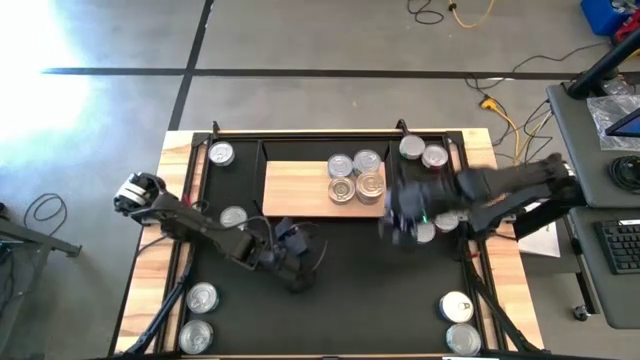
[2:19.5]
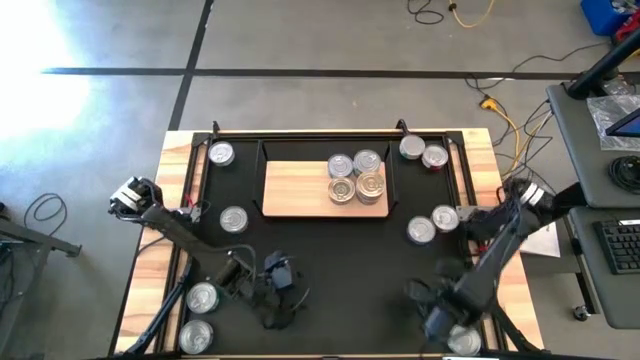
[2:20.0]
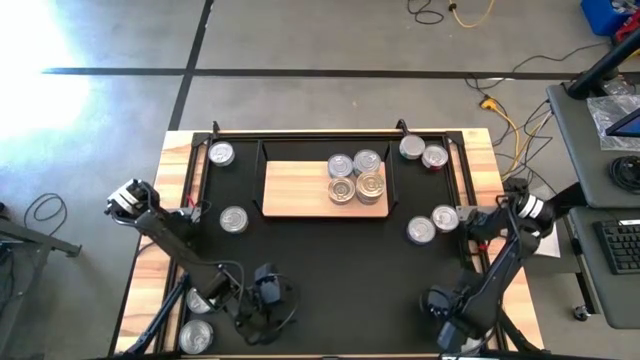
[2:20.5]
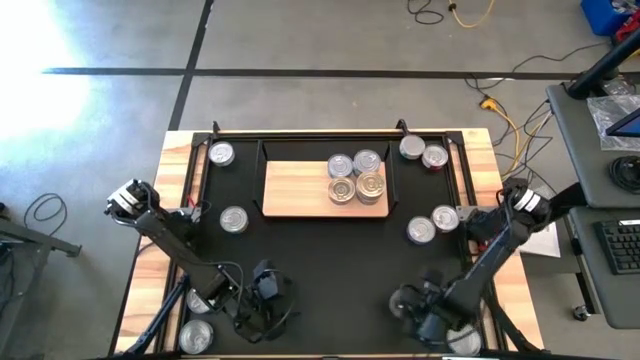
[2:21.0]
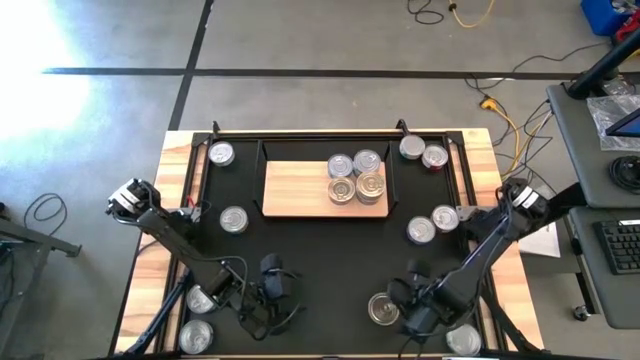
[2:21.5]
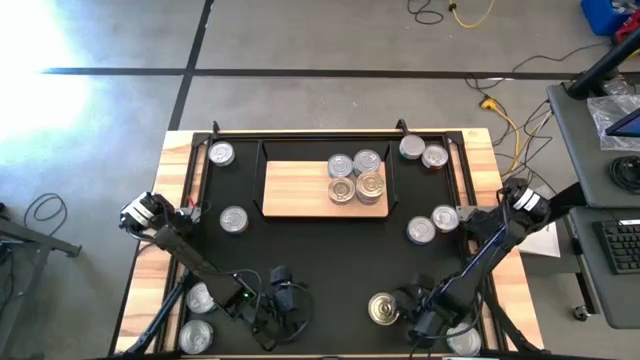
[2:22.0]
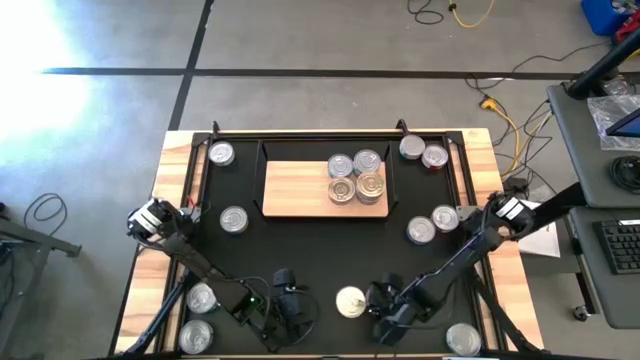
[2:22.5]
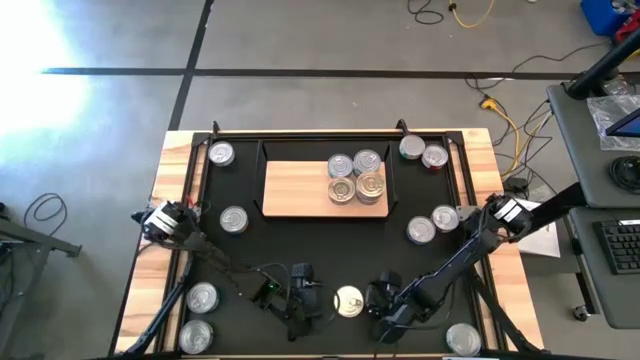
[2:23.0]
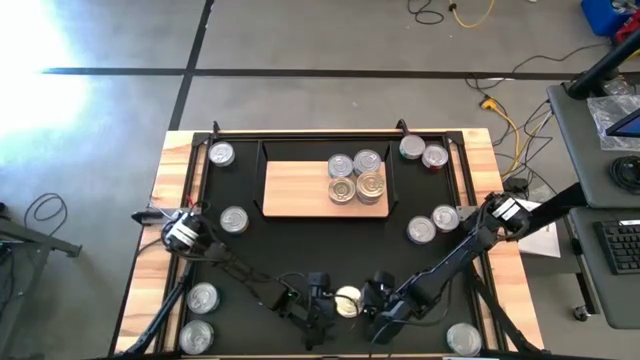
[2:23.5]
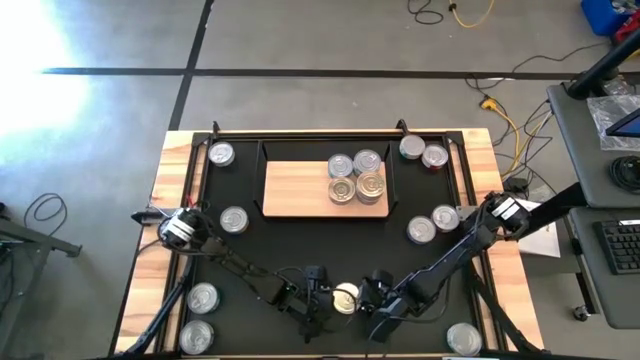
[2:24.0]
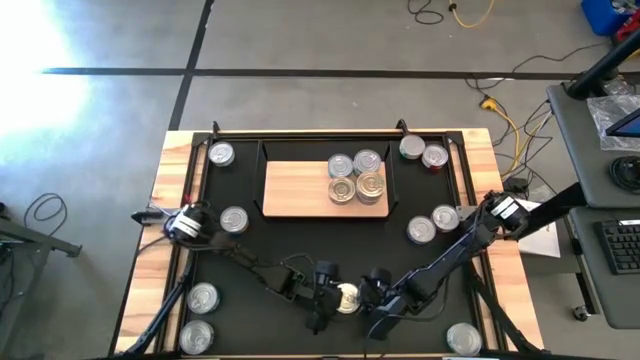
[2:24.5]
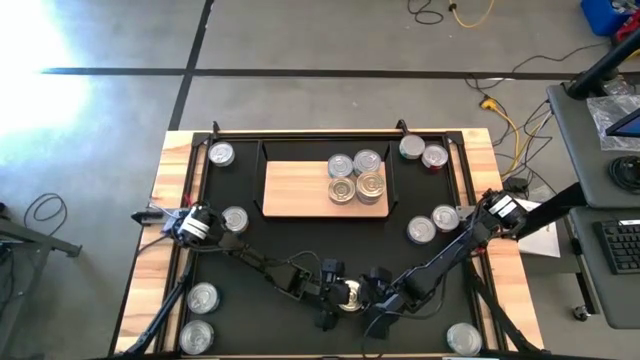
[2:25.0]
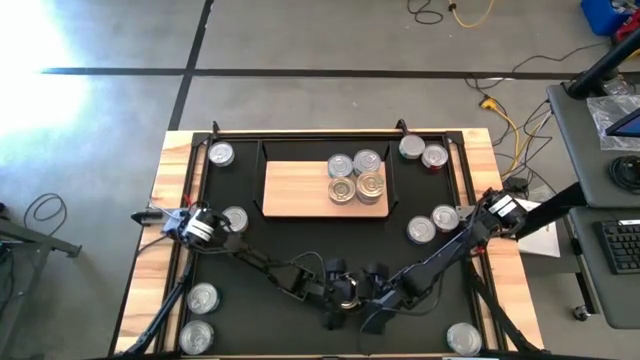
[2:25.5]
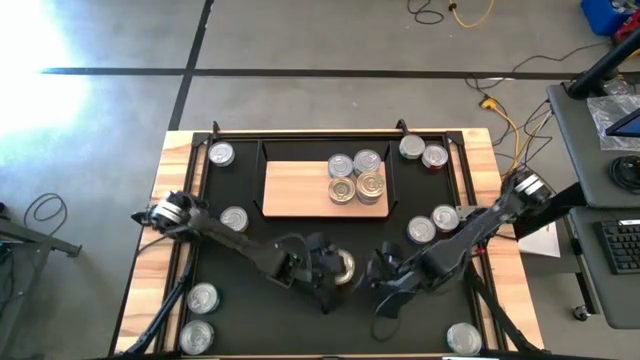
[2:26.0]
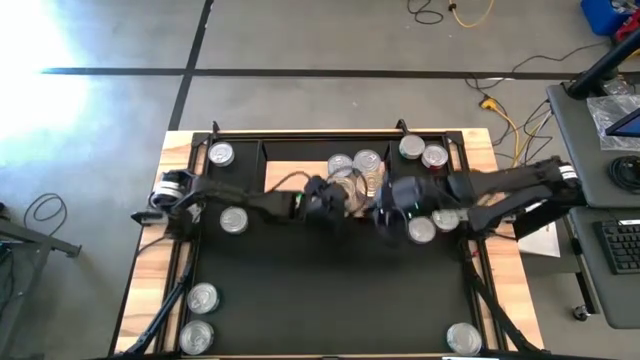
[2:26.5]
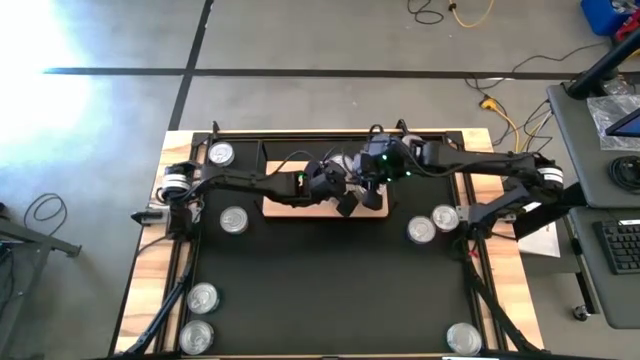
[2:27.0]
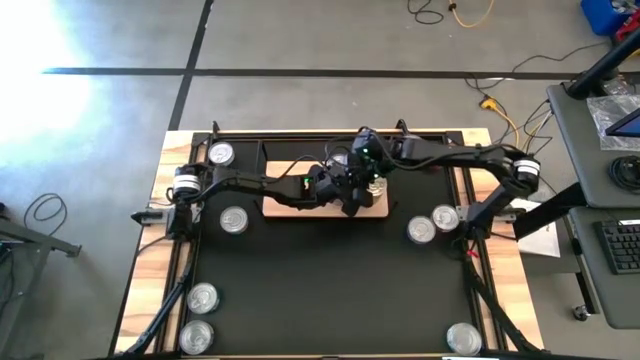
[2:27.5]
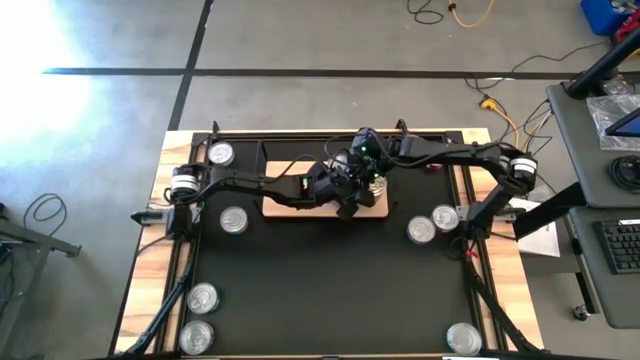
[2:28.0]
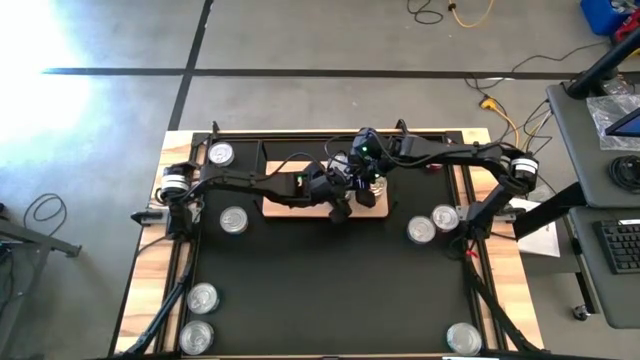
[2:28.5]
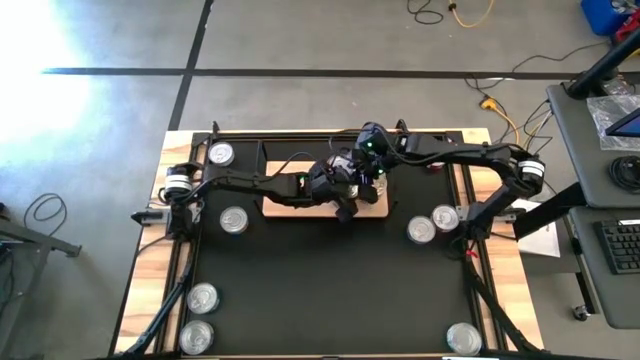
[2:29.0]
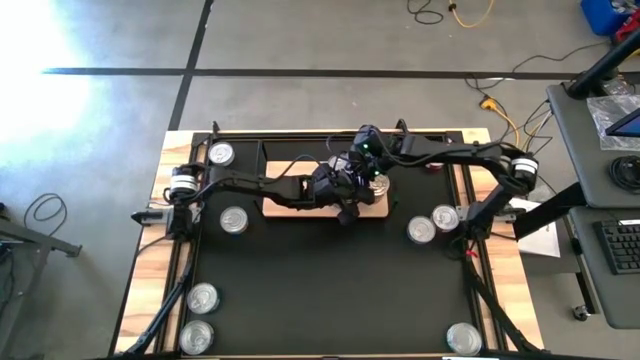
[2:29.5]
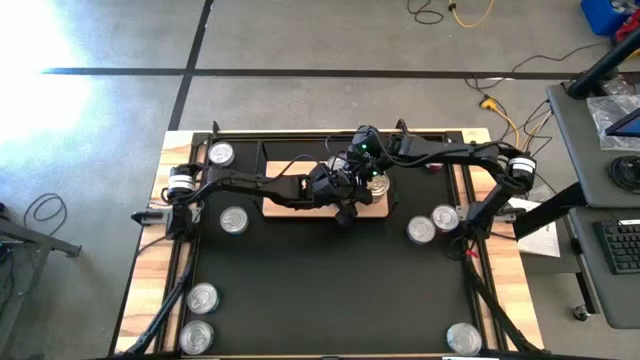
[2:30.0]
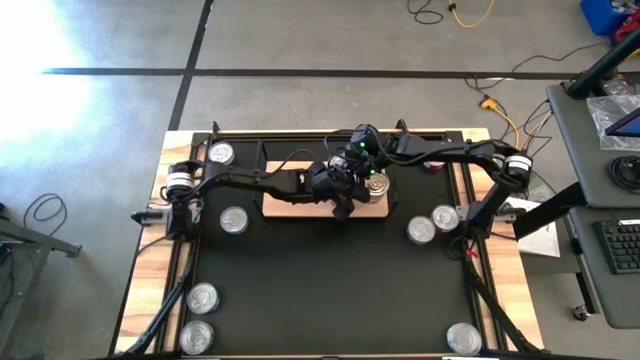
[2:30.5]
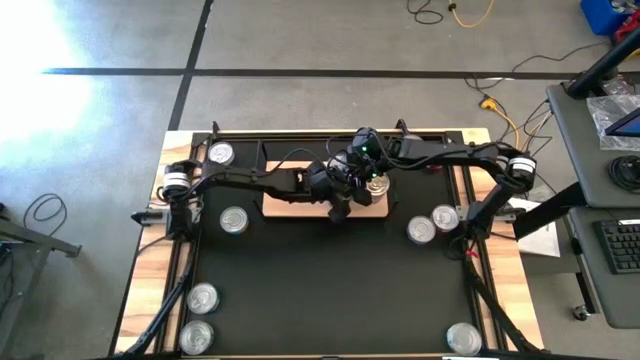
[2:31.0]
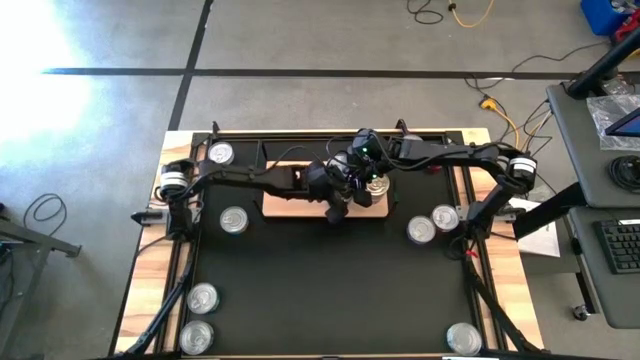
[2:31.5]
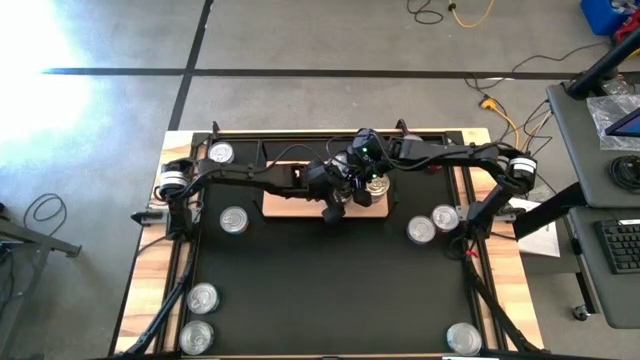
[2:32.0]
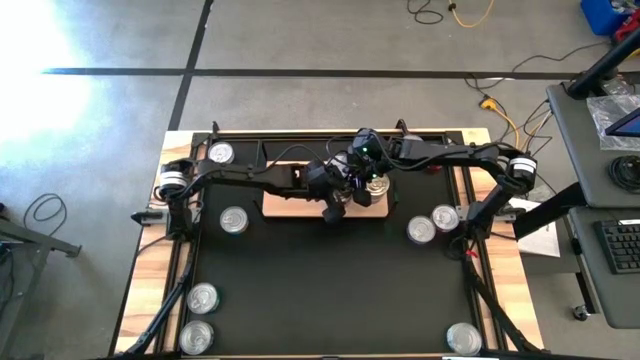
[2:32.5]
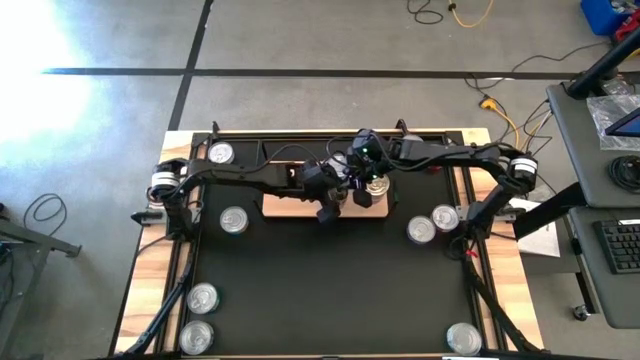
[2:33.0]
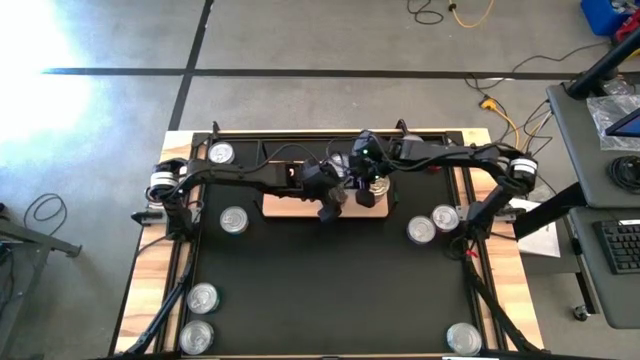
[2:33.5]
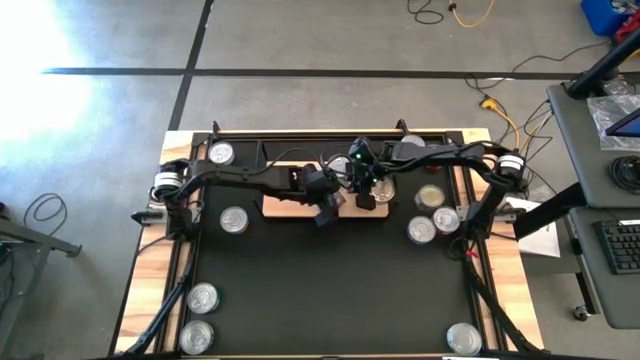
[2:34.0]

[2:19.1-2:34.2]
Task: Stack canned seafood by type on shelf
Stack the bottom right blue tuna can on the blue tuna can

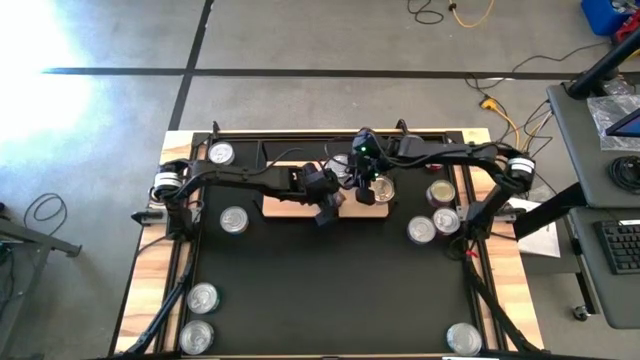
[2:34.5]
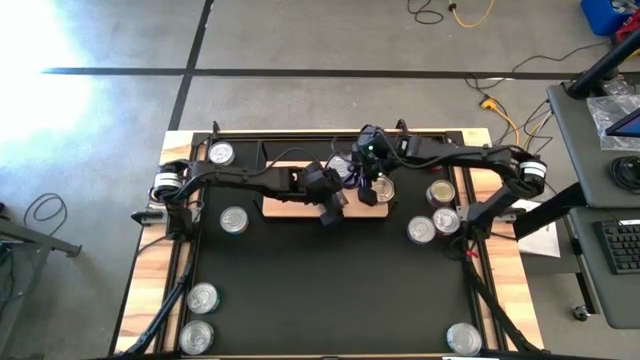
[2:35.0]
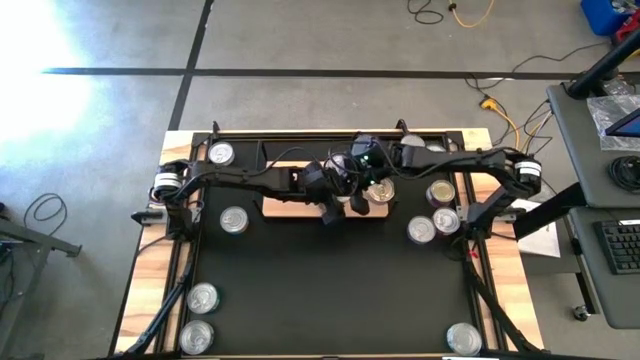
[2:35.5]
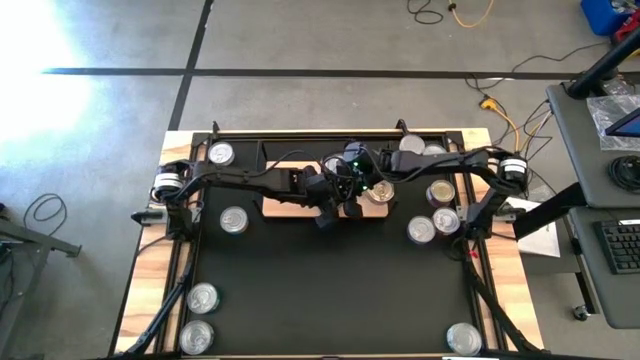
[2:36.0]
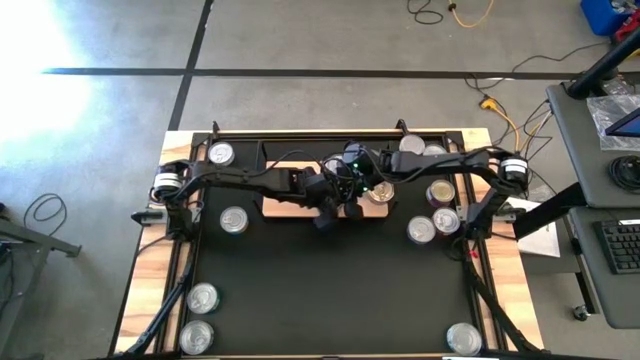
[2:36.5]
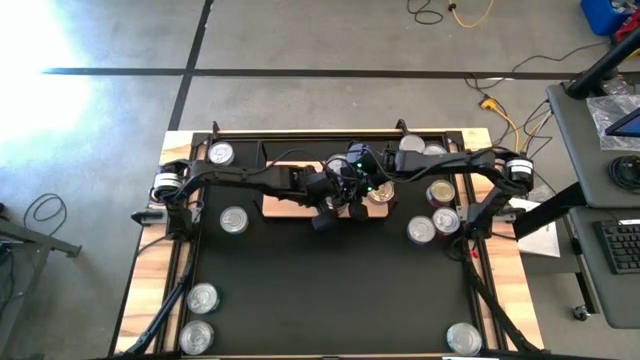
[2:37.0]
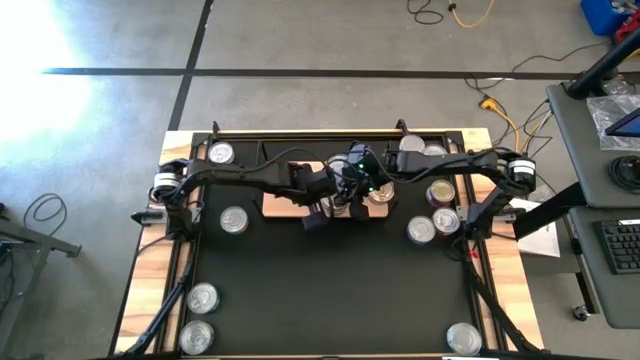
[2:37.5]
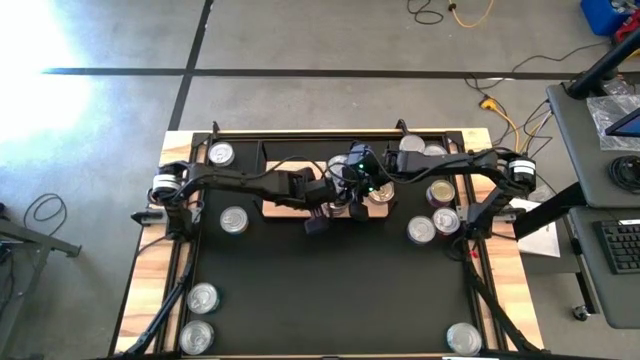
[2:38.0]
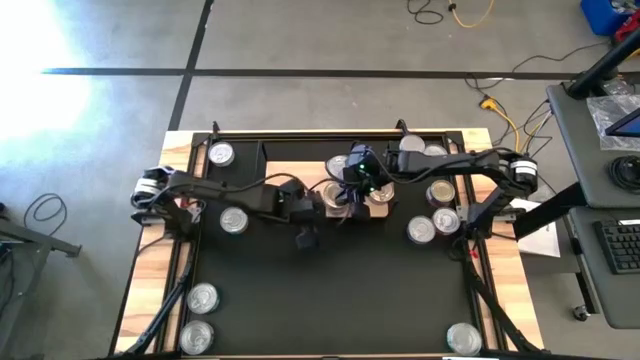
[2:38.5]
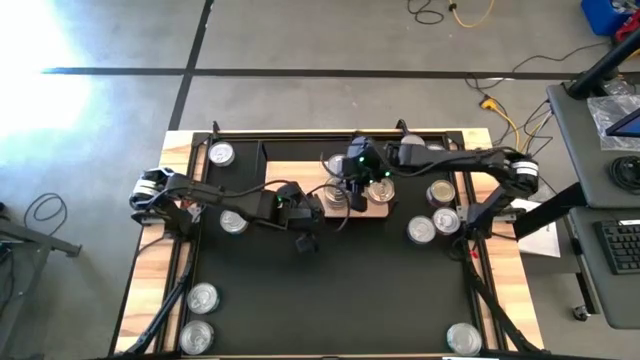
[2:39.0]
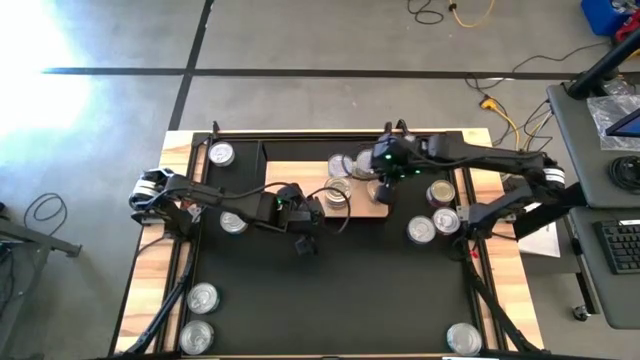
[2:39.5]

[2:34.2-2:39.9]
Stack the bottom right blue tuna can on the blue tuna can

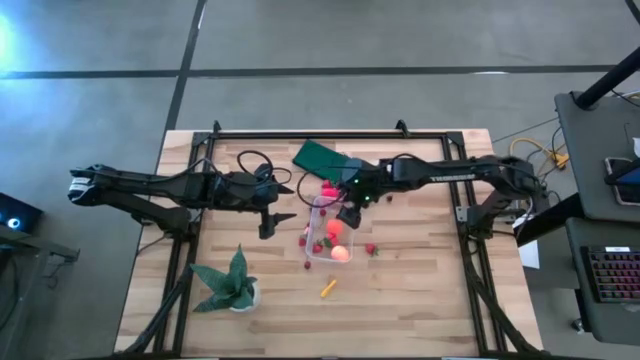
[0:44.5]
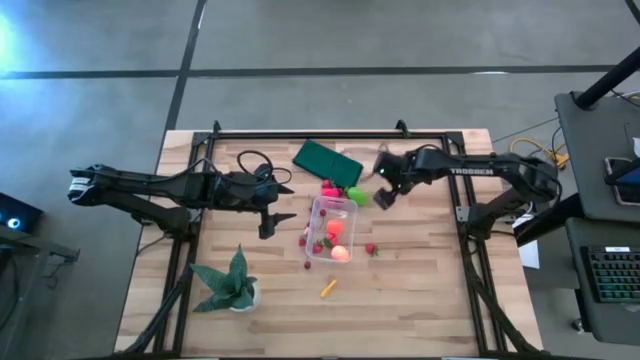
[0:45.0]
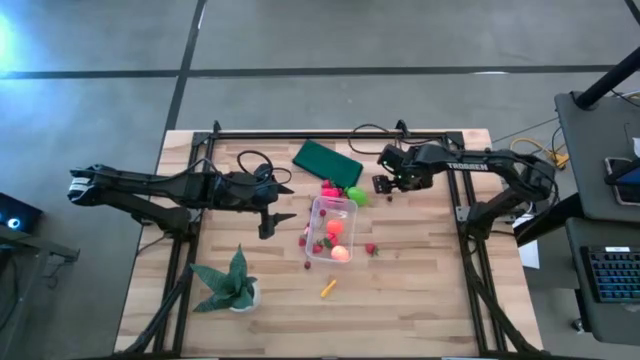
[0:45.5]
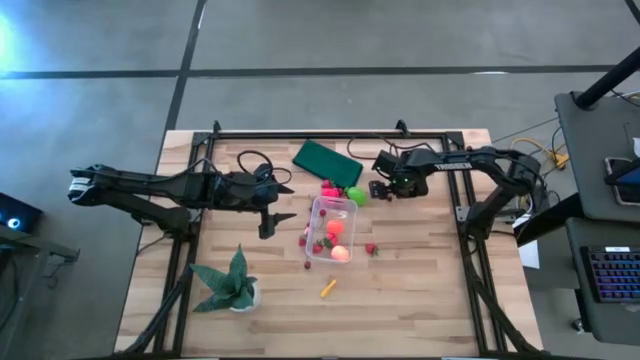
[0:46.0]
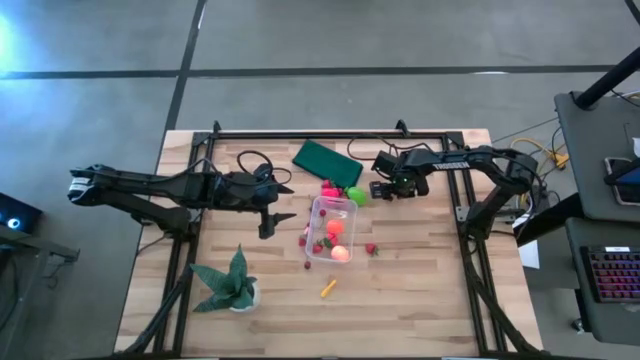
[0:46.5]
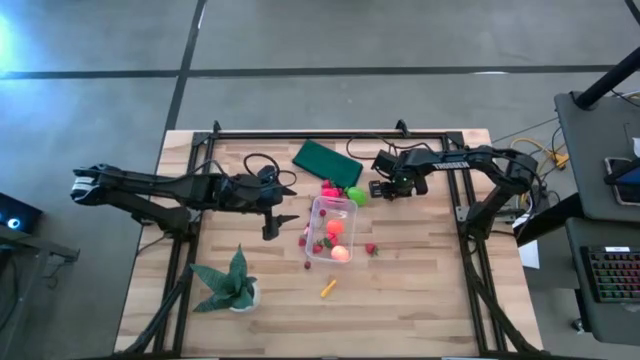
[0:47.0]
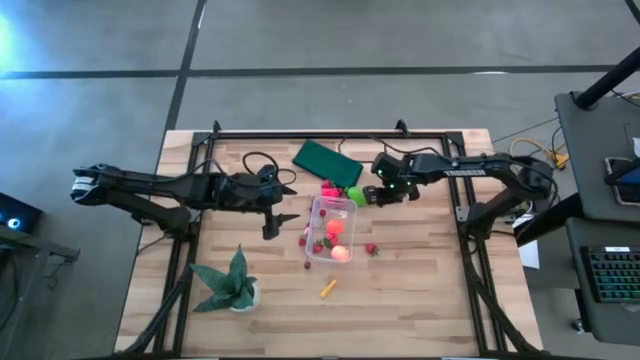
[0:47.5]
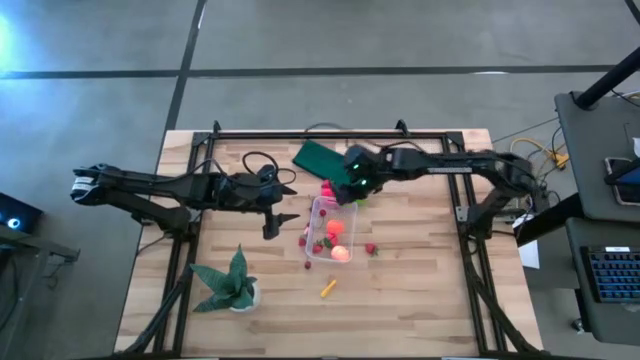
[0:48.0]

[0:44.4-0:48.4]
Task: Pick and placing Produce into tupperware
Put the red cherry into the transparent bin
